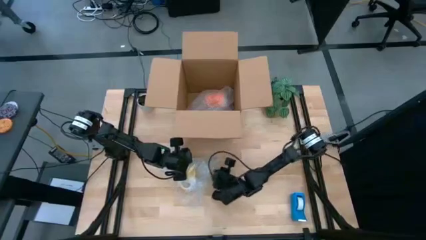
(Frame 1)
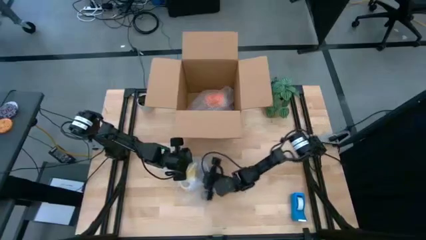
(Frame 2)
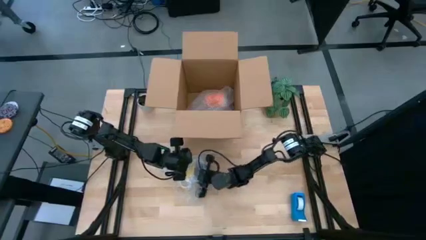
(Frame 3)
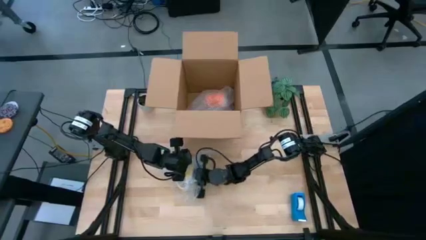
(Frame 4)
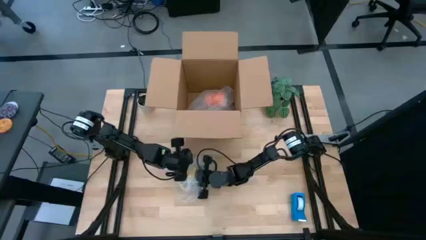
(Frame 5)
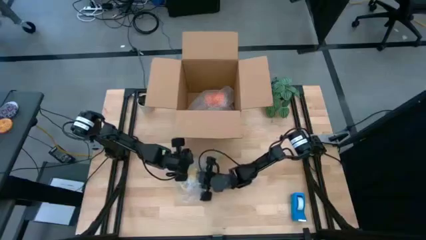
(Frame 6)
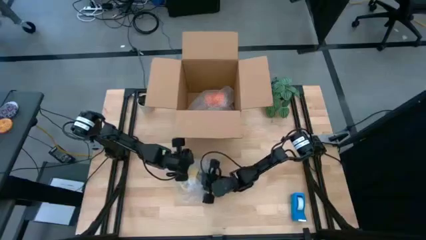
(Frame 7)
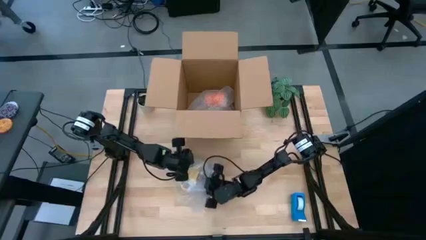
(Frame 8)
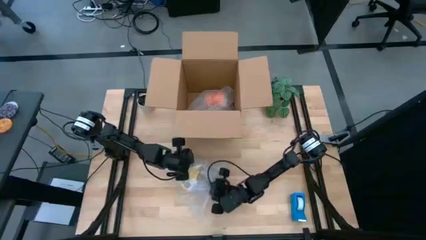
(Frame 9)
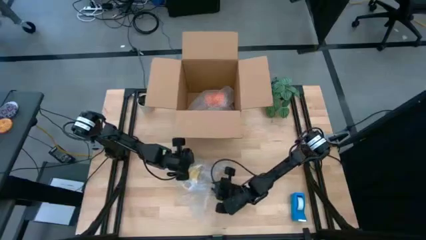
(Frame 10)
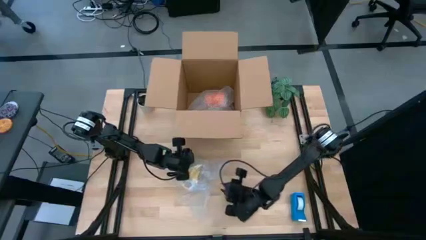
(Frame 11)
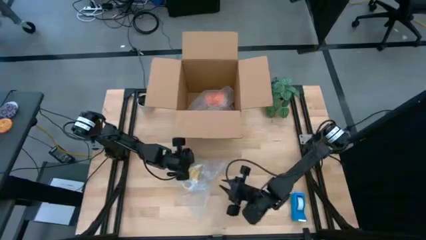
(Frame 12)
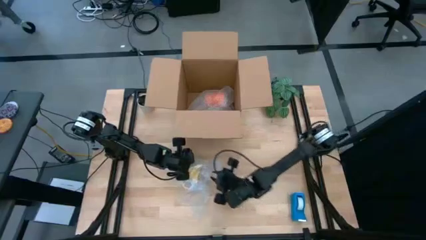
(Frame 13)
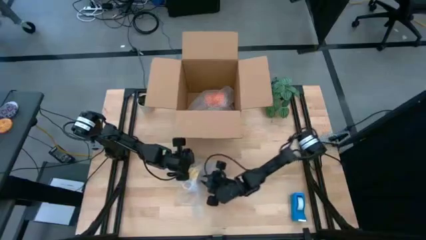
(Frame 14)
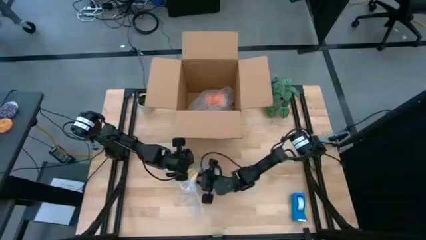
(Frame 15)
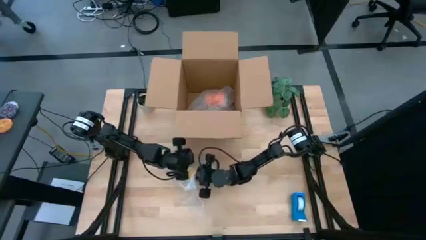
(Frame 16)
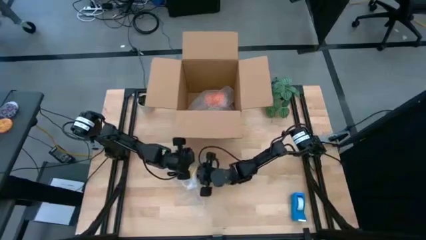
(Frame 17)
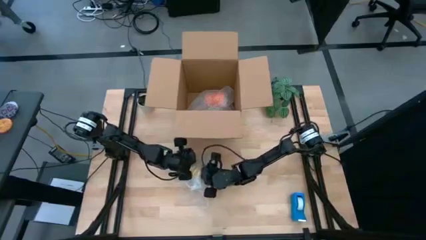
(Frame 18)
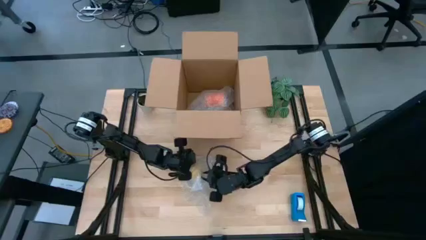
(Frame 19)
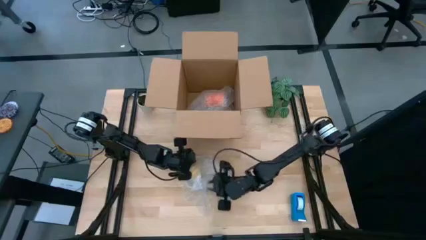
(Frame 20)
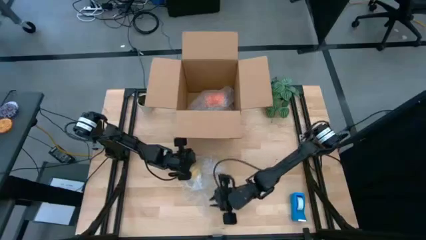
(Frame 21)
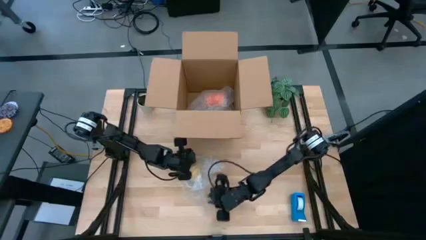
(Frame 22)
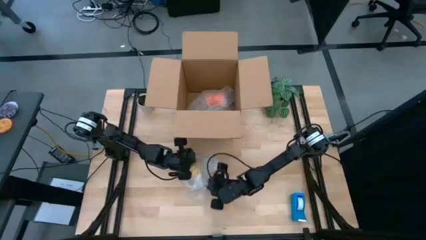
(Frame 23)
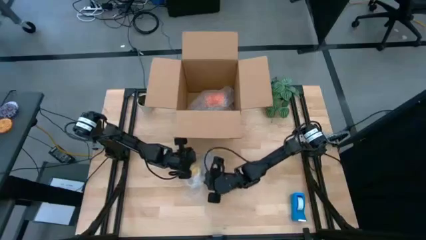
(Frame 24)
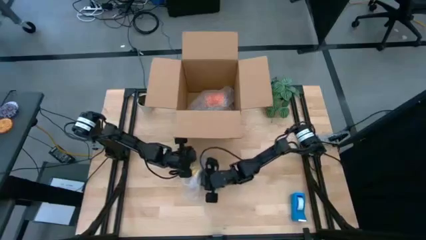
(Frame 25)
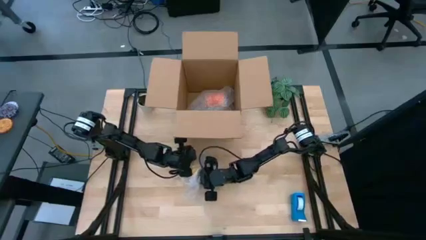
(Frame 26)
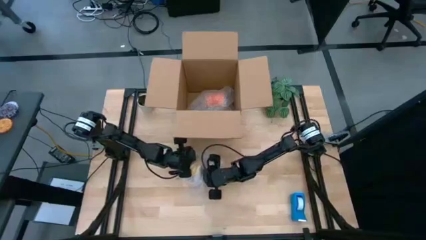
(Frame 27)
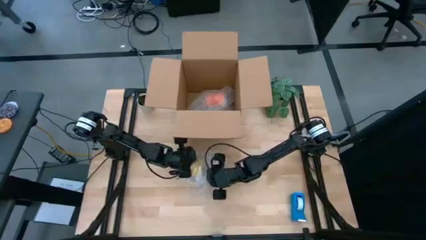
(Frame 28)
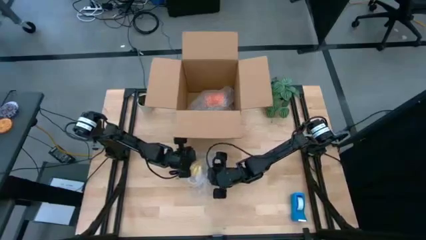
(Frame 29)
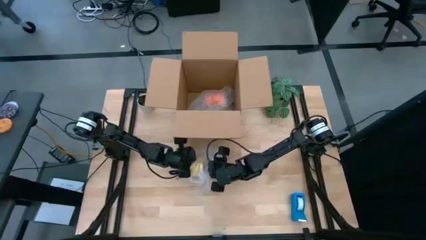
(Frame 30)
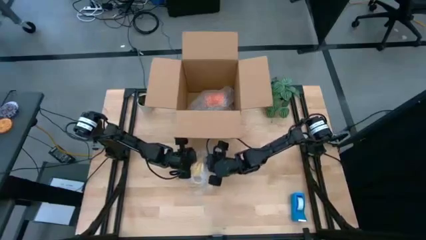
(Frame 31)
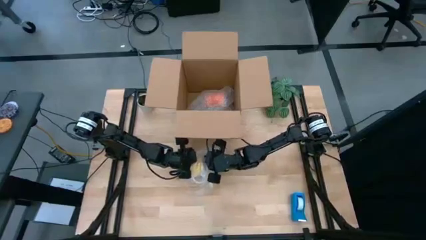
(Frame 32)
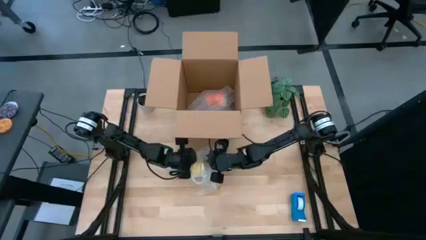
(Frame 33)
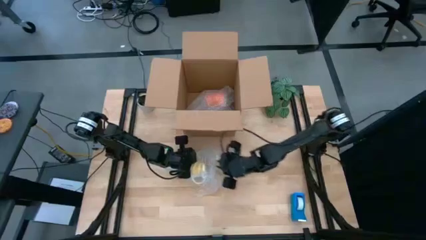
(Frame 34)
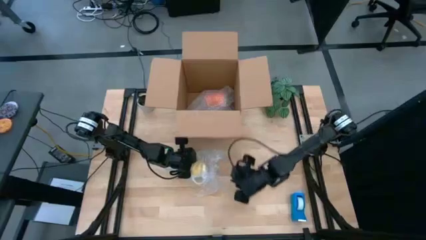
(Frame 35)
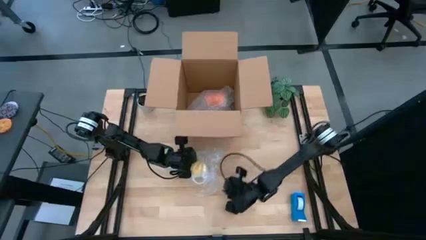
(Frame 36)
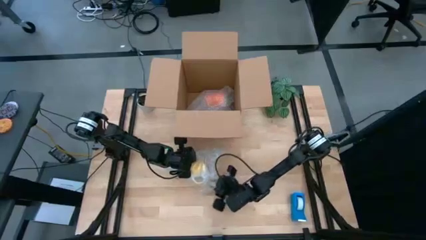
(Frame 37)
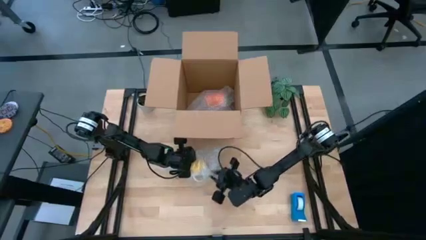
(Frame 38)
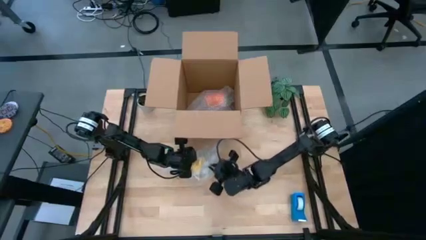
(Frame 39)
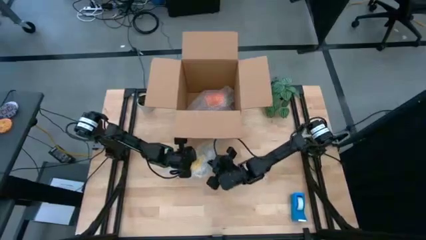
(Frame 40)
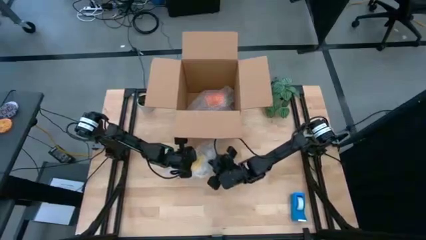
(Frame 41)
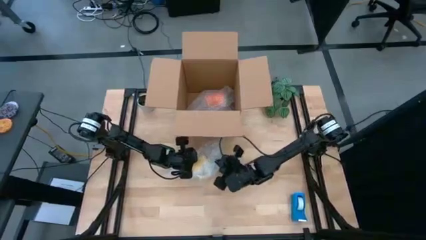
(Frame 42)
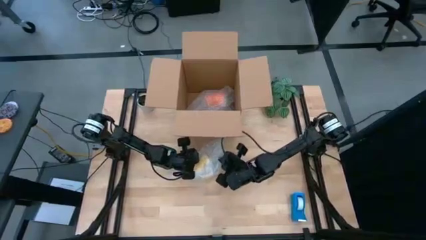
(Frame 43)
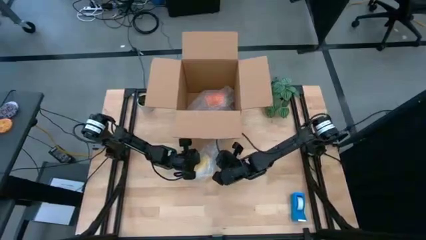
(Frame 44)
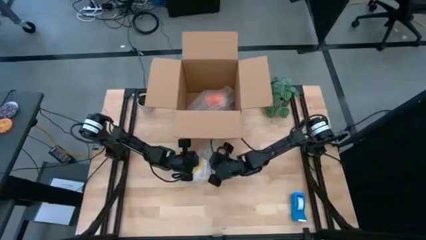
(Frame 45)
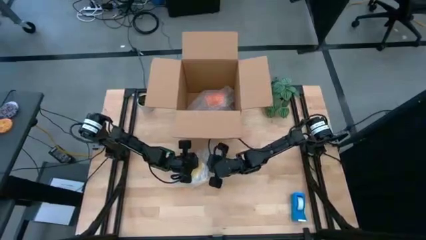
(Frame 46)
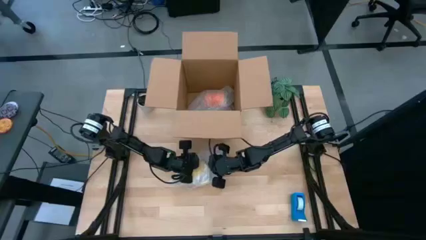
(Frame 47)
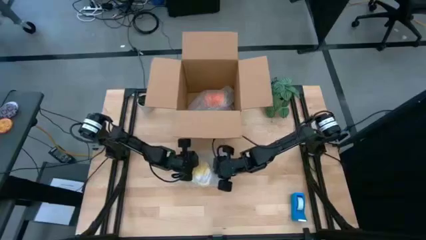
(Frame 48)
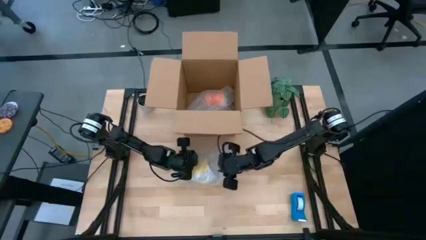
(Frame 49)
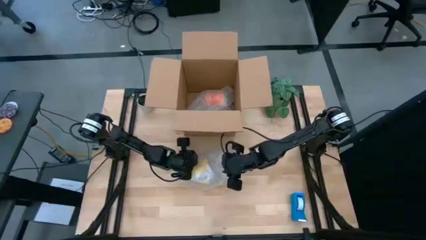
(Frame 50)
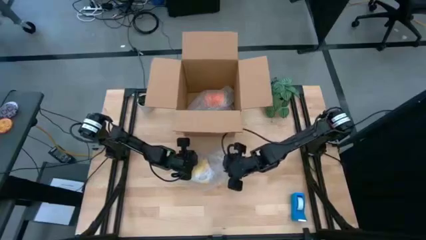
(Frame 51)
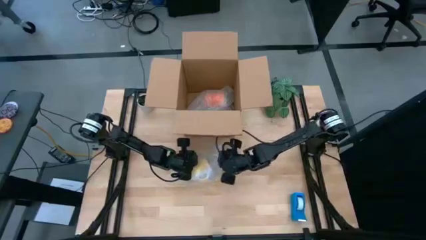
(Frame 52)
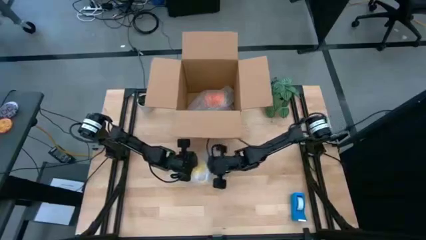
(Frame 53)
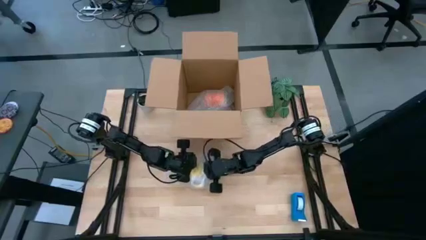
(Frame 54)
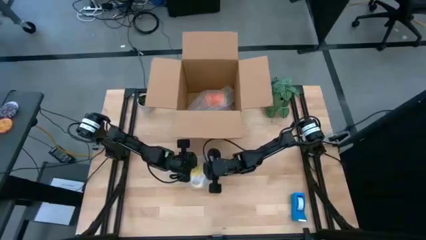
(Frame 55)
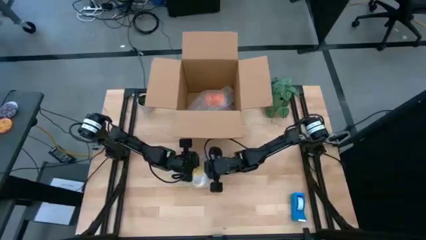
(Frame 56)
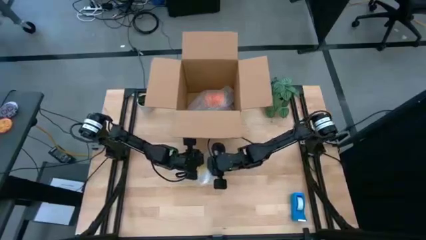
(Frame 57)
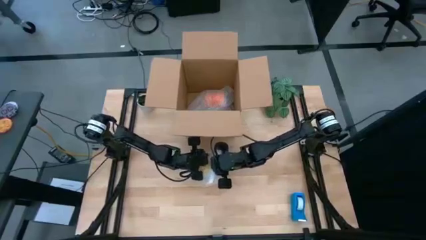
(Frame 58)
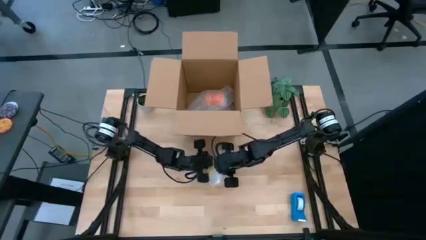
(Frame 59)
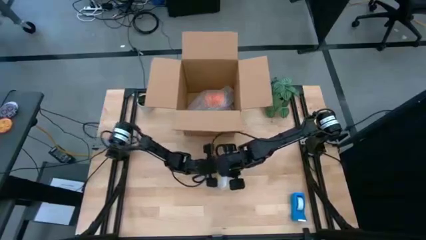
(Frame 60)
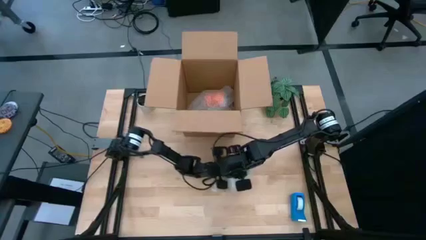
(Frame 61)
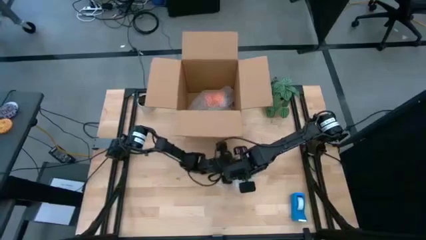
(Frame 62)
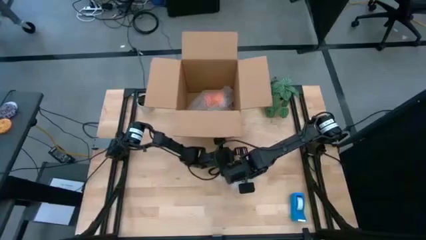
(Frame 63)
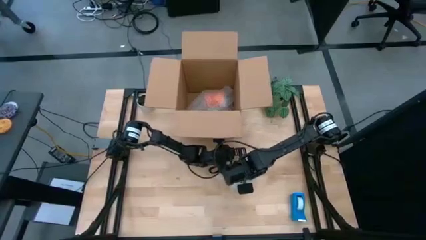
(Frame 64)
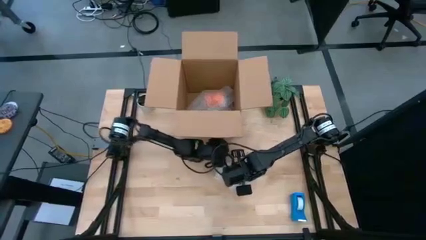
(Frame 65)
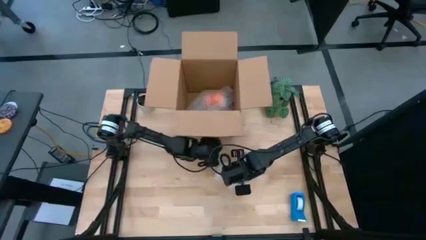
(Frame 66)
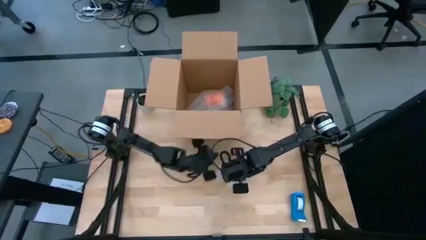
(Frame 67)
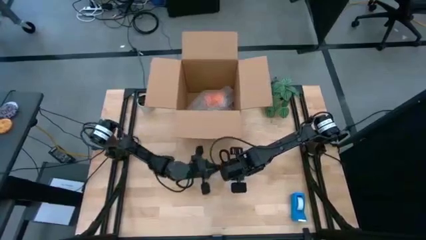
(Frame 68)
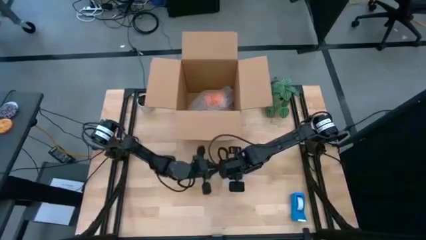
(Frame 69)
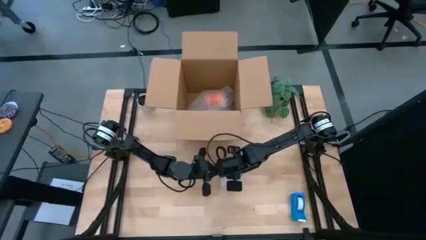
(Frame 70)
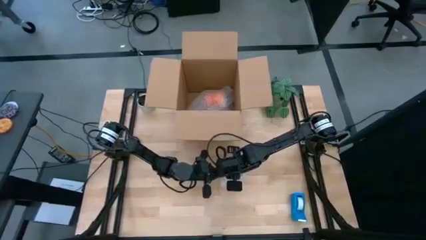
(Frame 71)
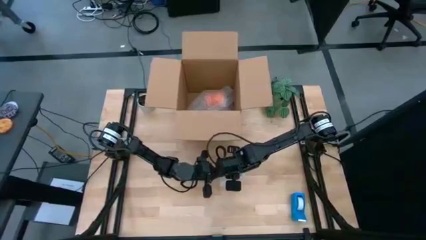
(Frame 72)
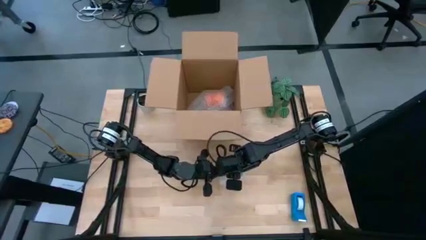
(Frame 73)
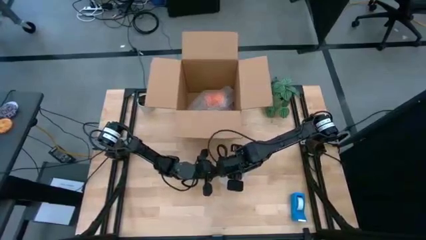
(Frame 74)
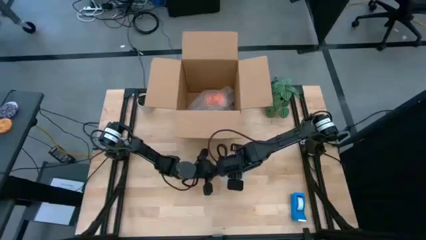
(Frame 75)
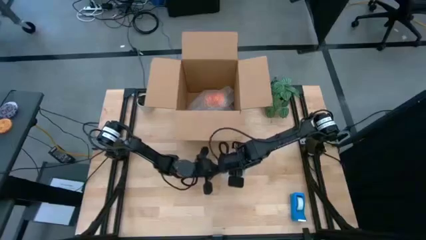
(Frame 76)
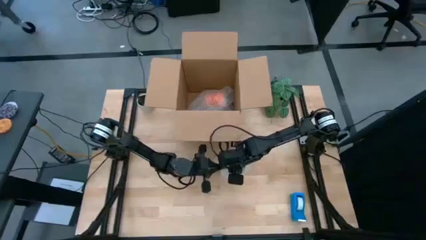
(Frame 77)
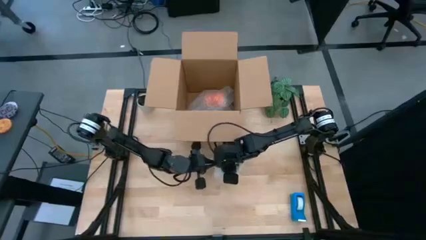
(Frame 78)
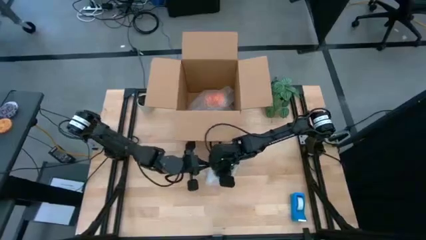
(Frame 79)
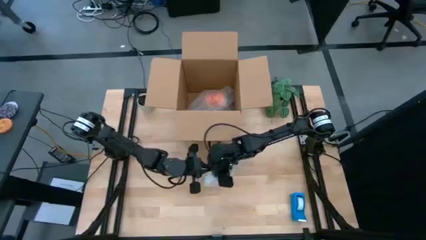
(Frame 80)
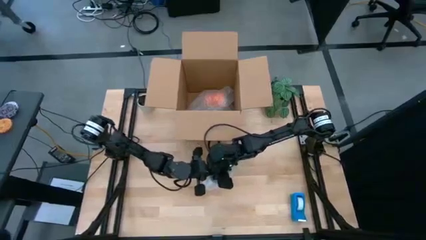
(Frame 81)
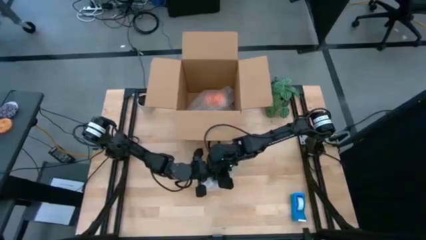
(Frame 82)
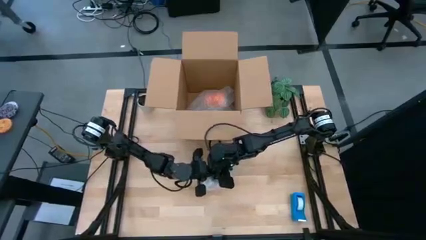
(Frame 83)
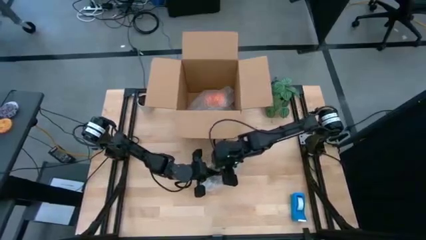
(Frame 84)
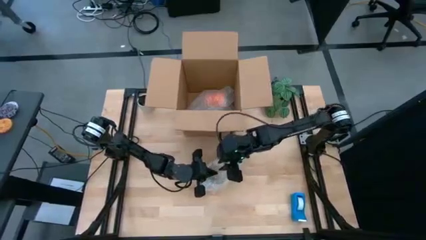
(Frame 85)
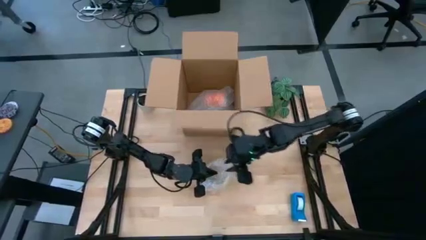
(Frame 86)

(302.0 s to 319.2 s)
Task: wrap mug
Wrap the yellow mug with the bubble wrap
